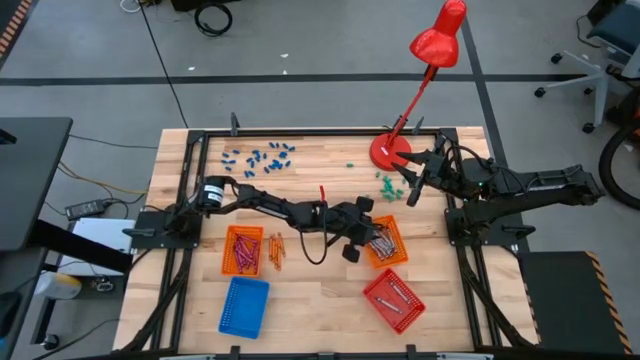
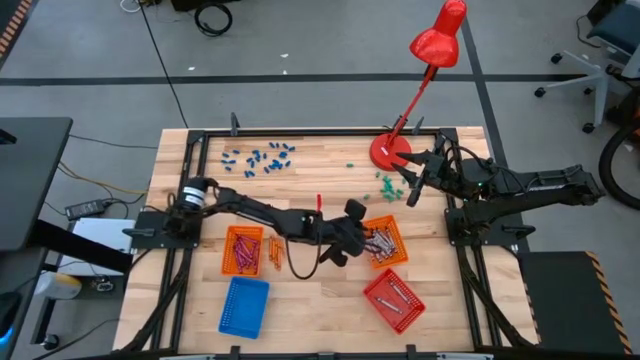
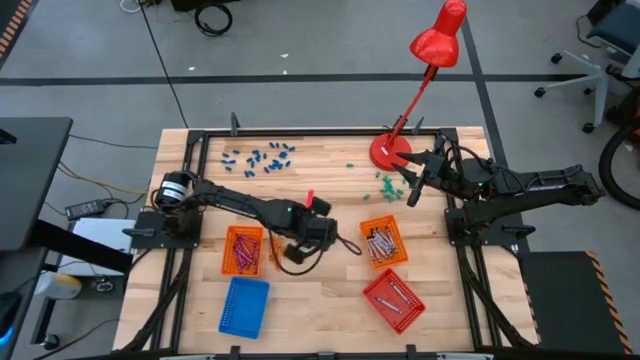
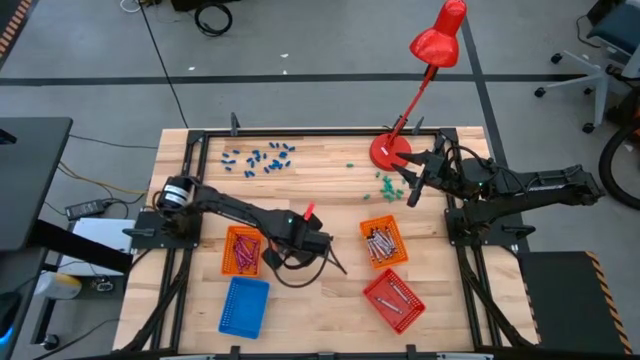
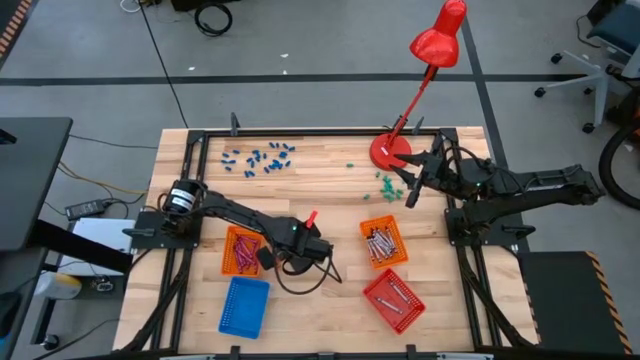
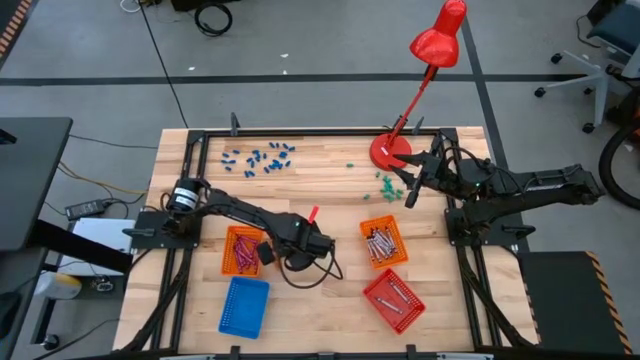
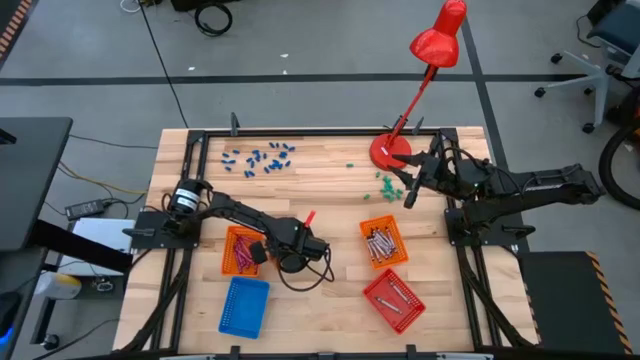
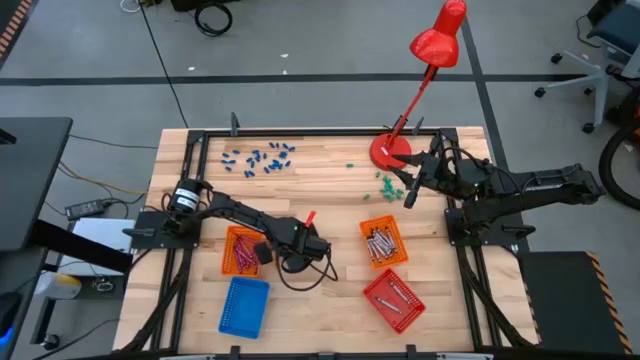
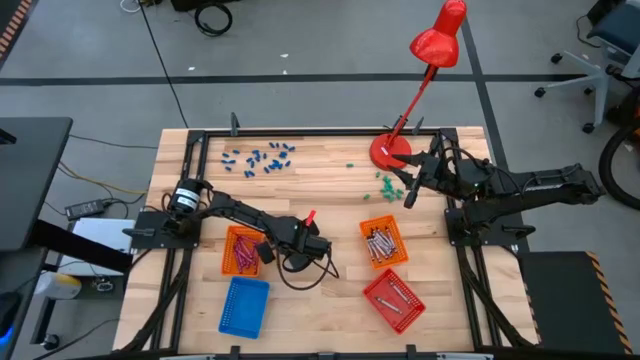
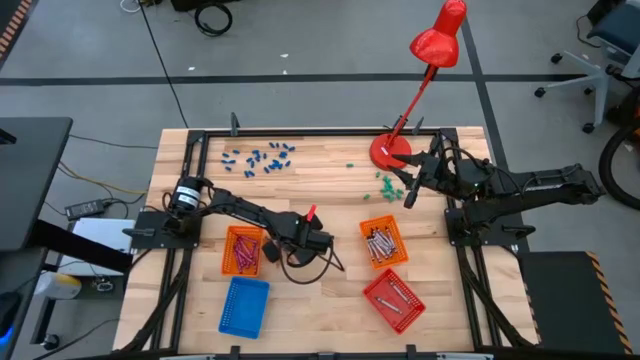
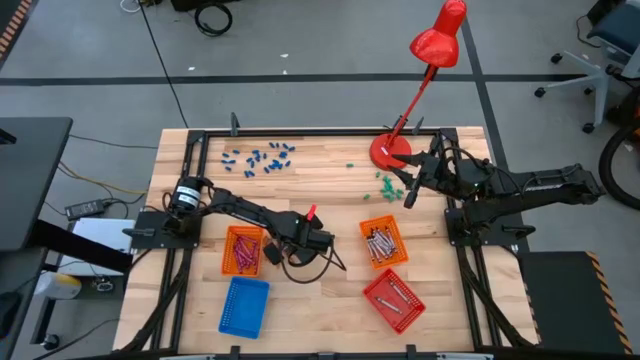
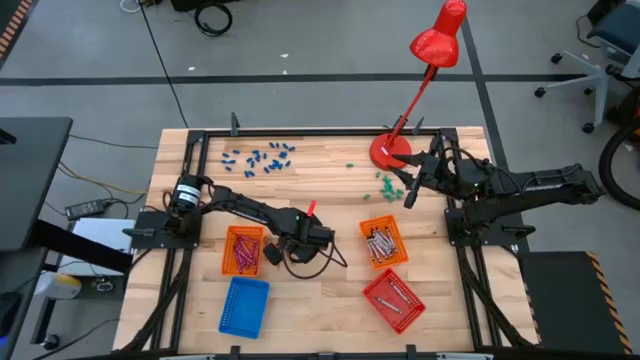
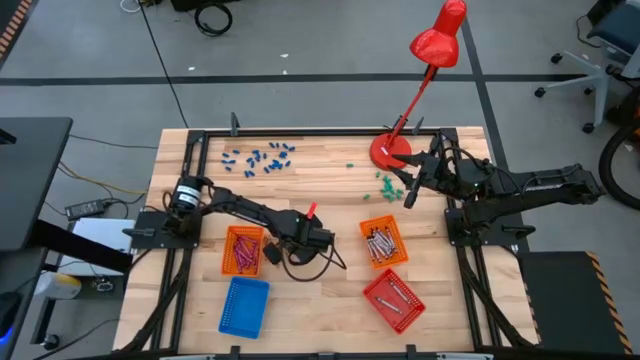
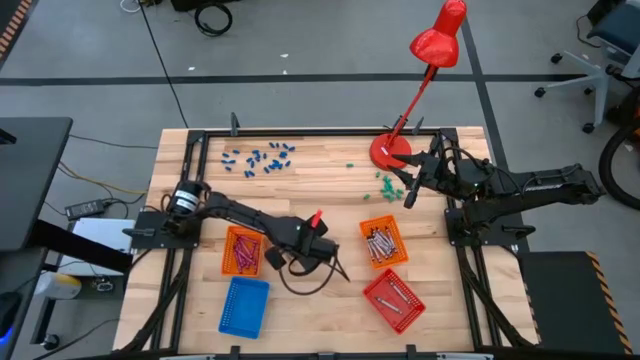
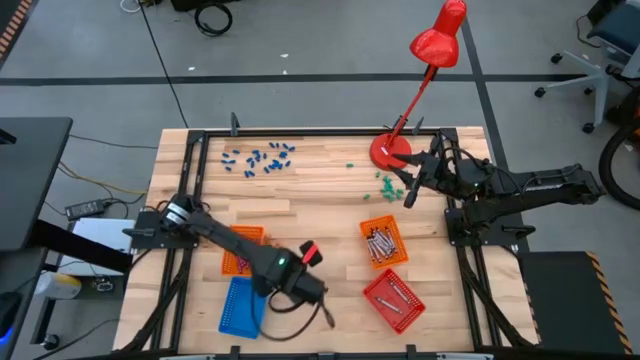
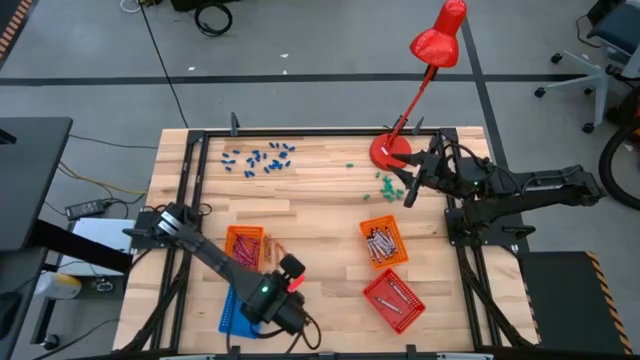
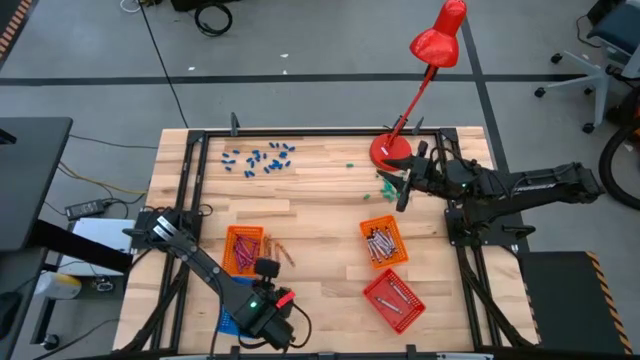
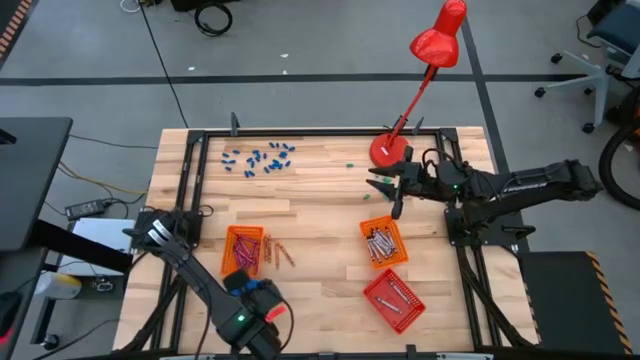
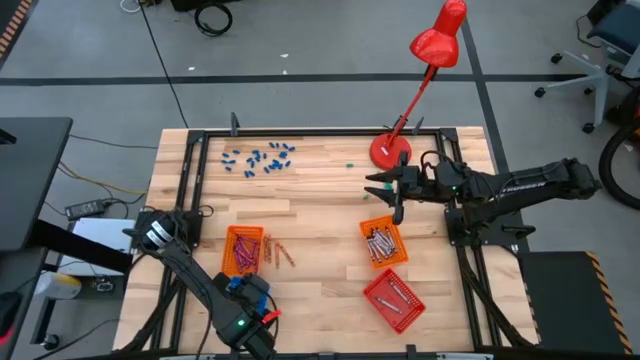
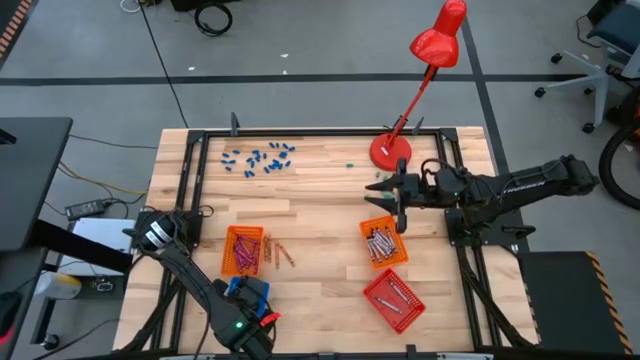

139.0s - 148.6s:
Task: Sort crayons
Put the orange crayon into the blue bin

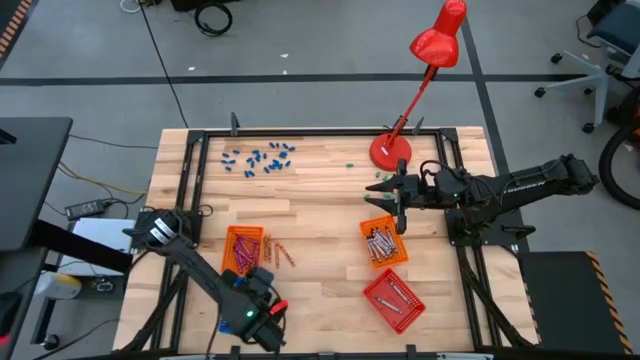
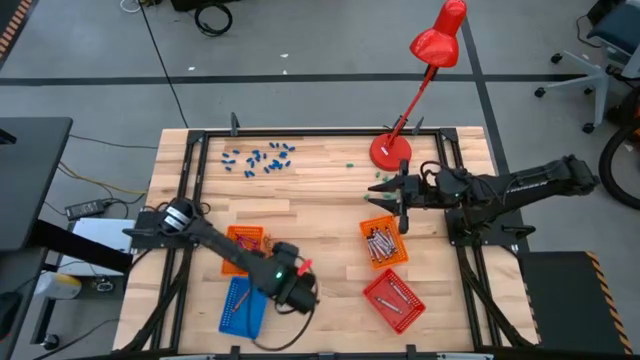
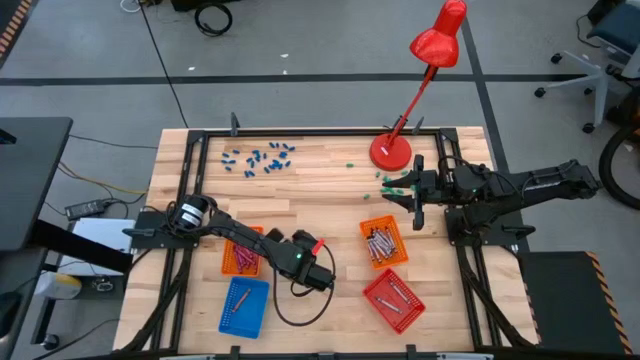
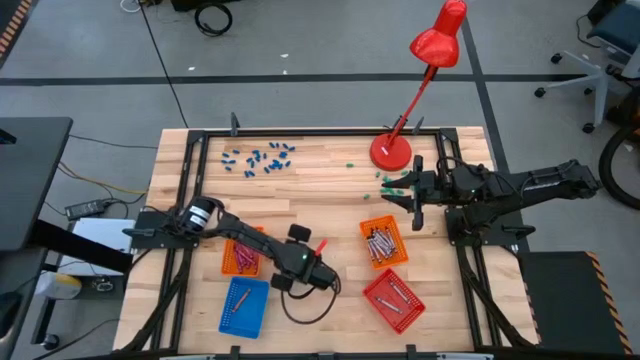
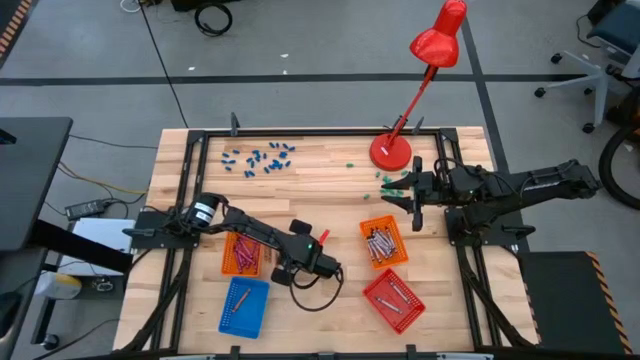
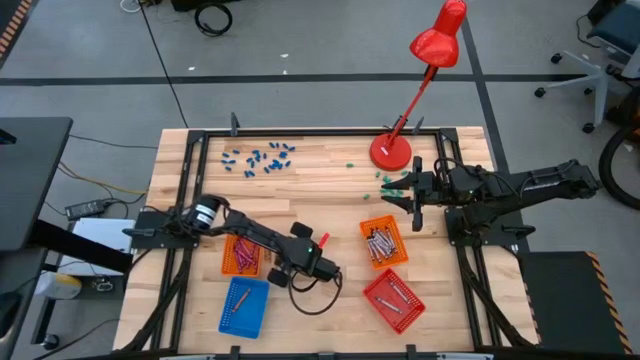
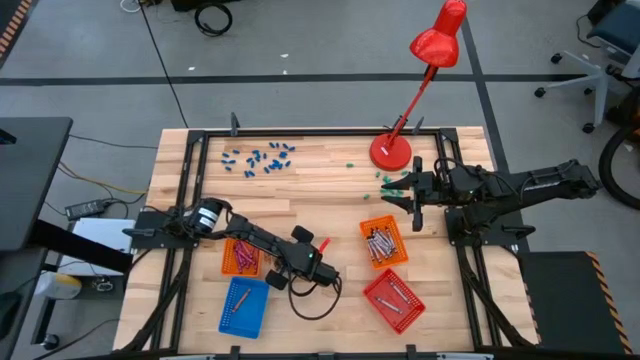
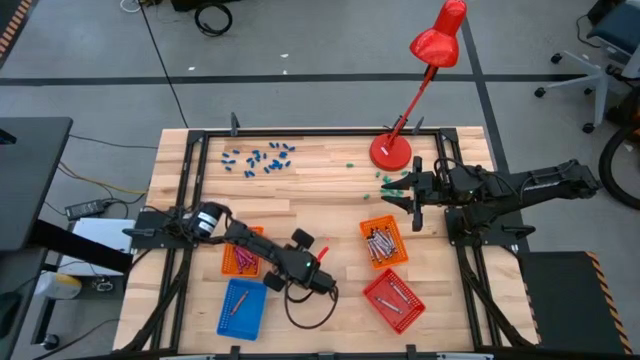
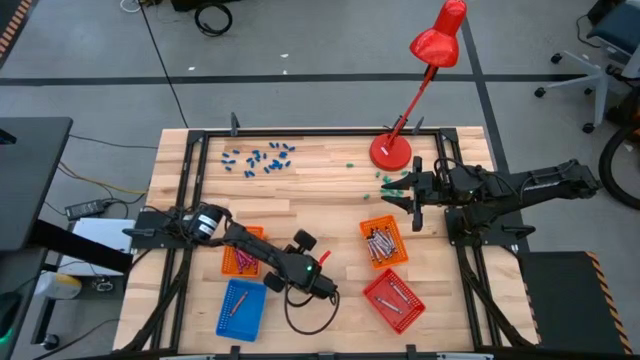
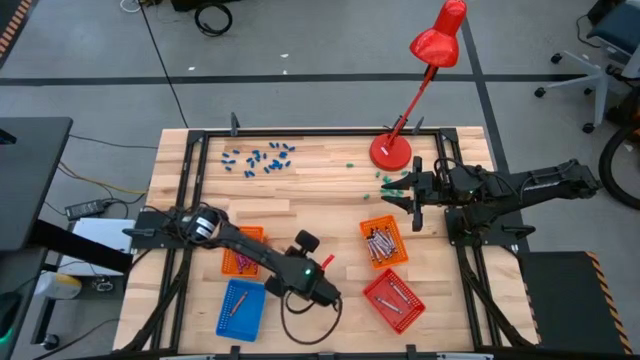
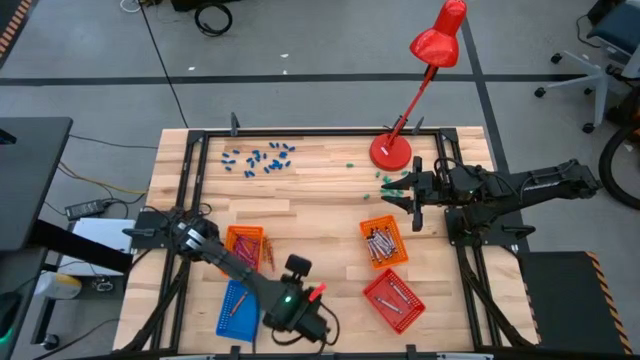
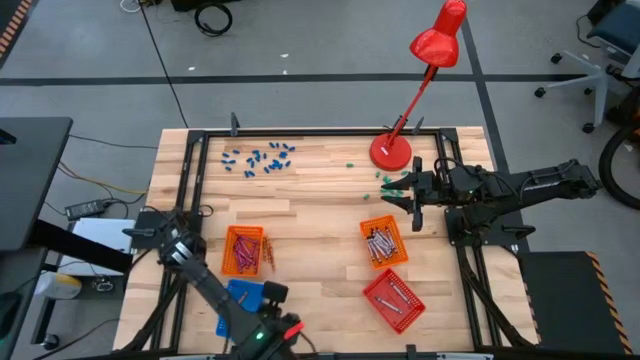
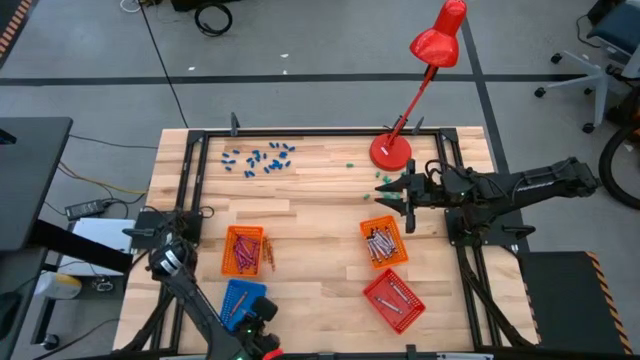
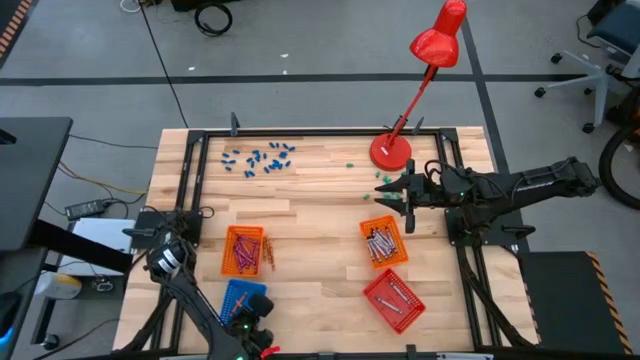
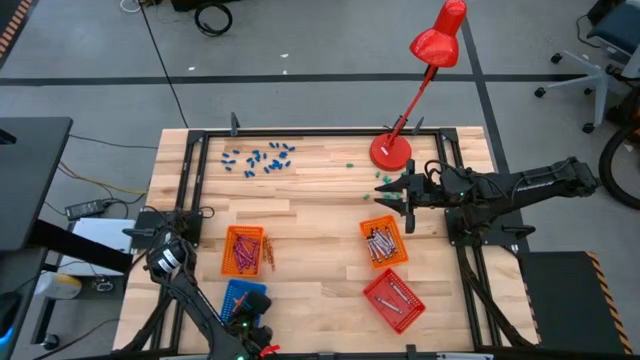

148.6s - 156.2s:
Put the orange crayon into the blue bin

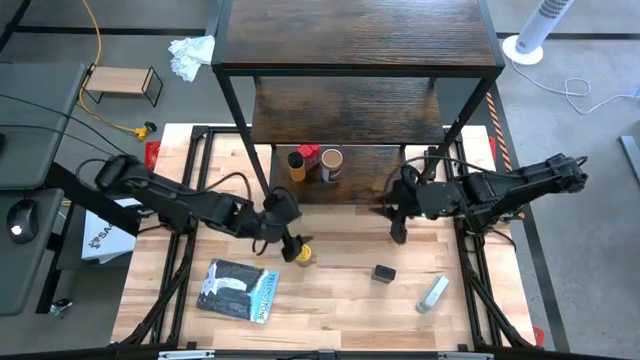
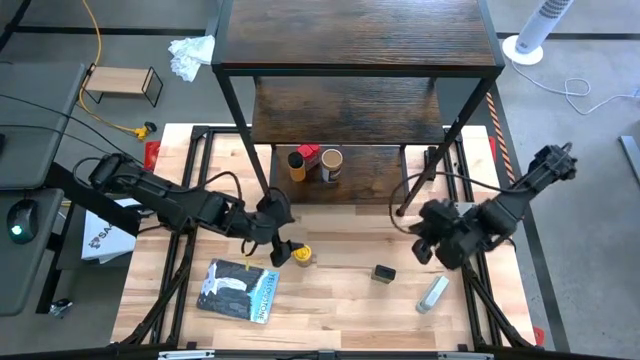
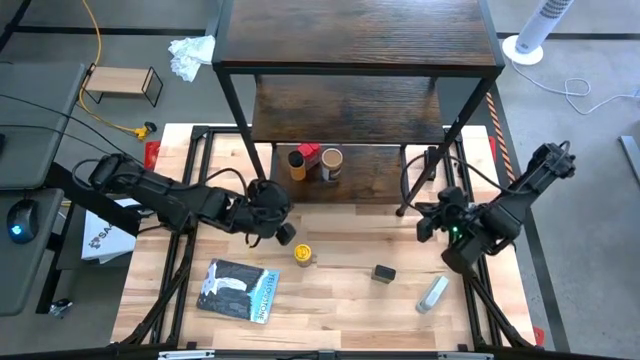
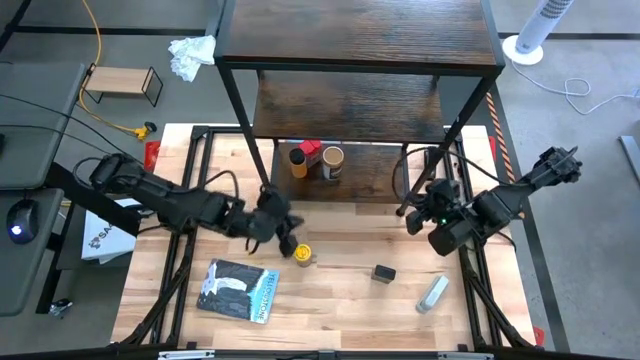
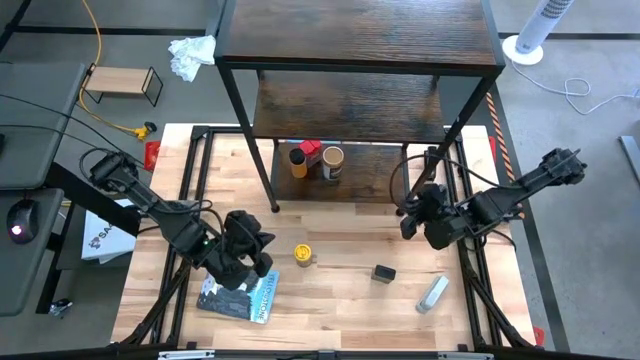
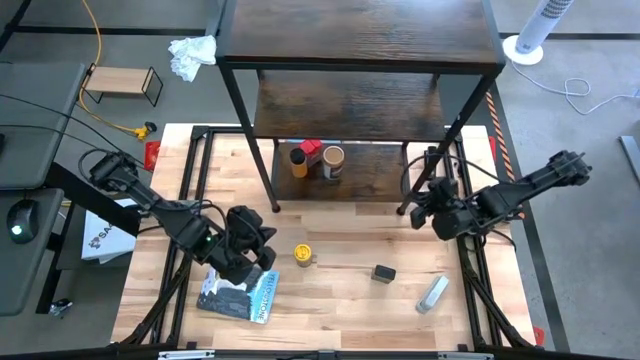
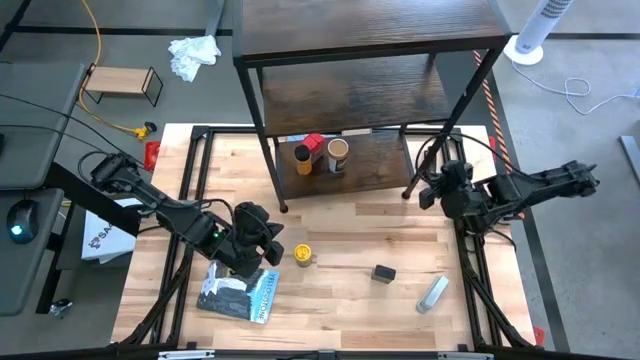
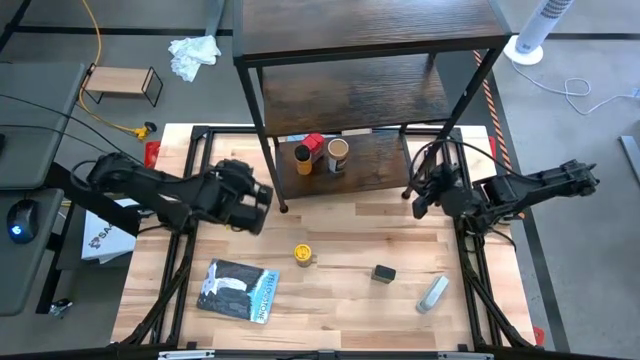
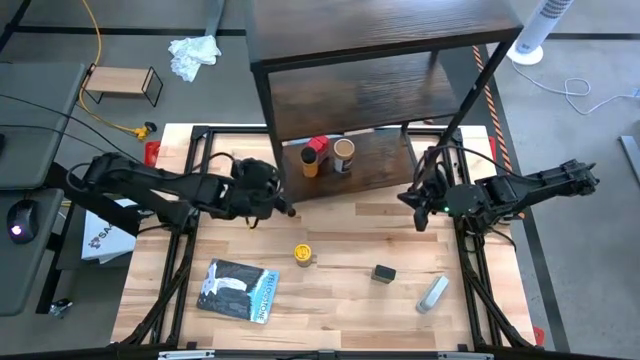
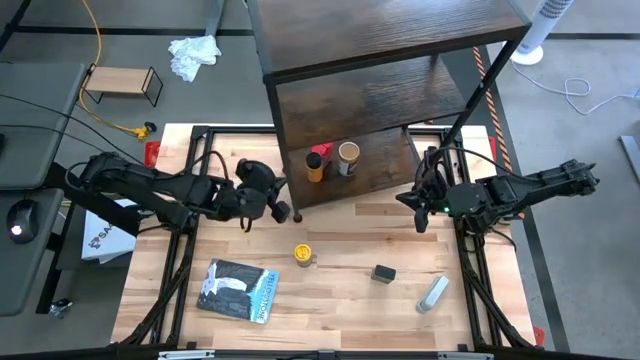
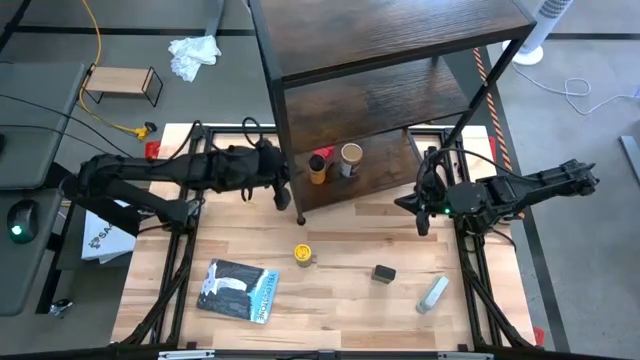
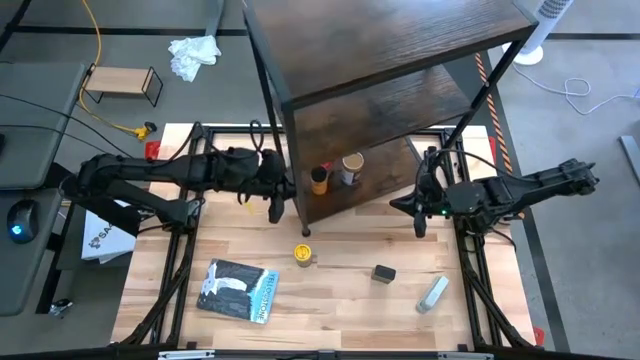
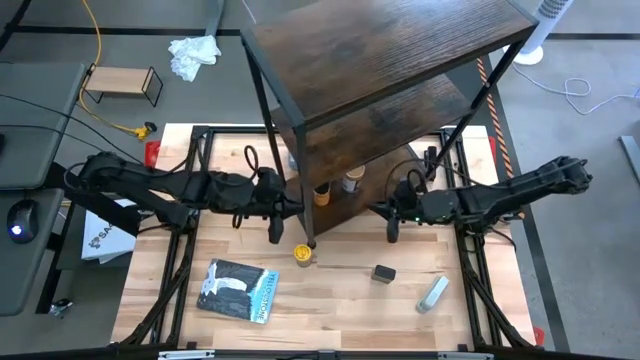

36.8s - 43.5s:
Task: Shelf spices
Adjust the shelf
